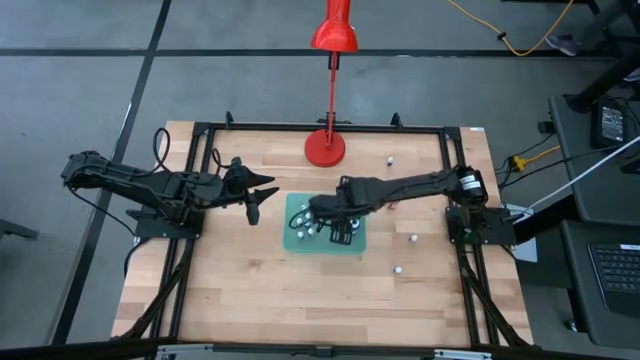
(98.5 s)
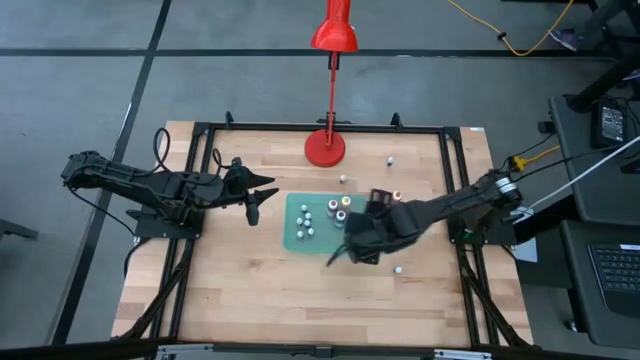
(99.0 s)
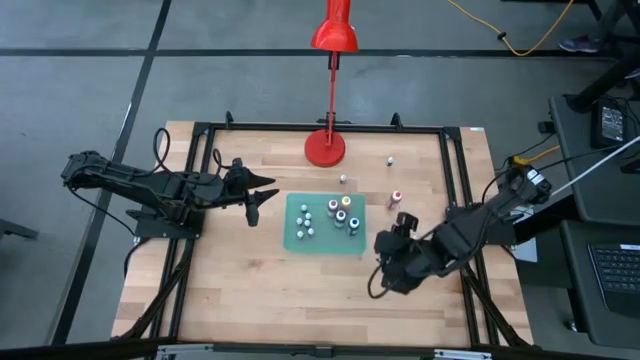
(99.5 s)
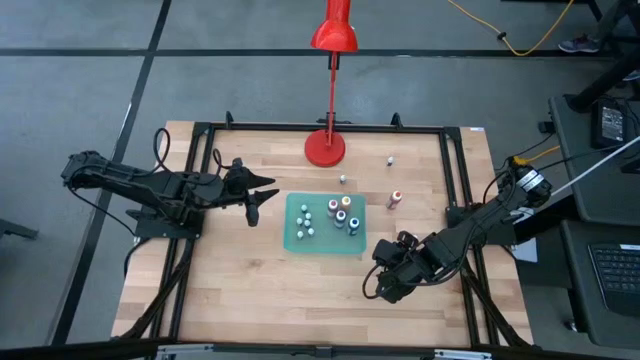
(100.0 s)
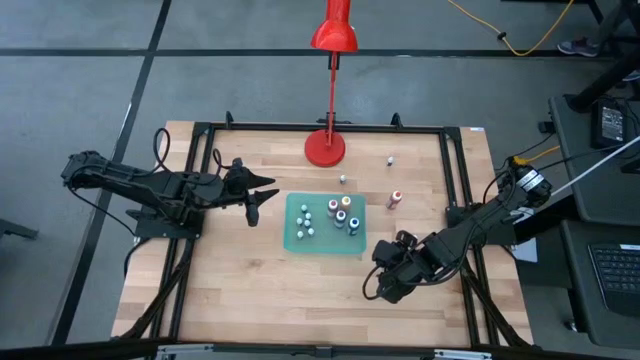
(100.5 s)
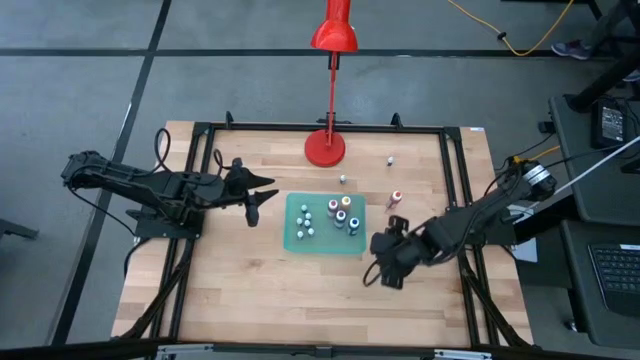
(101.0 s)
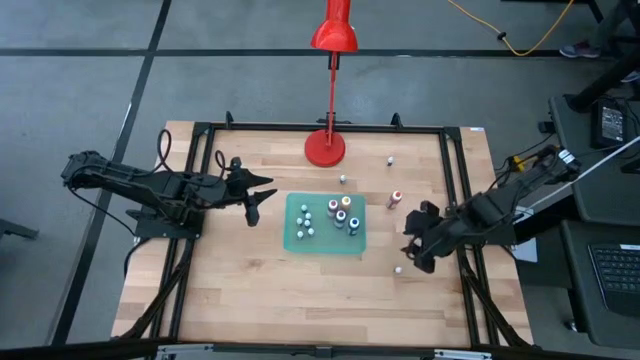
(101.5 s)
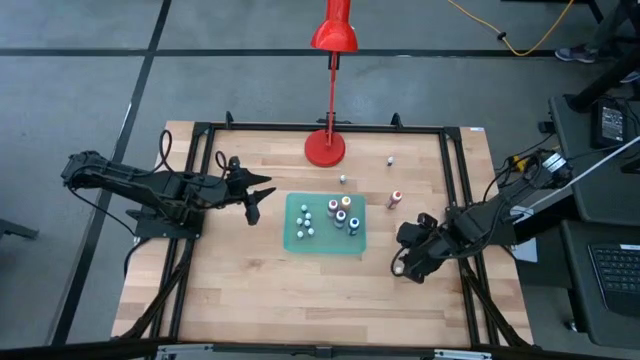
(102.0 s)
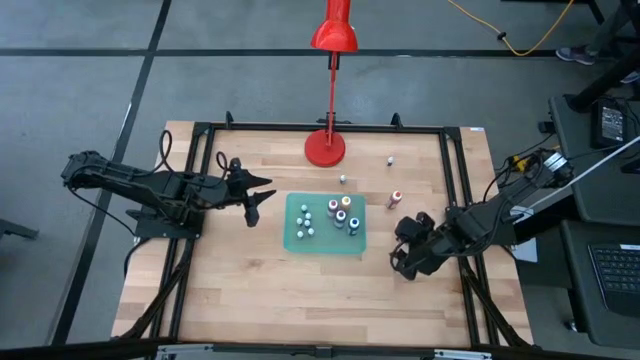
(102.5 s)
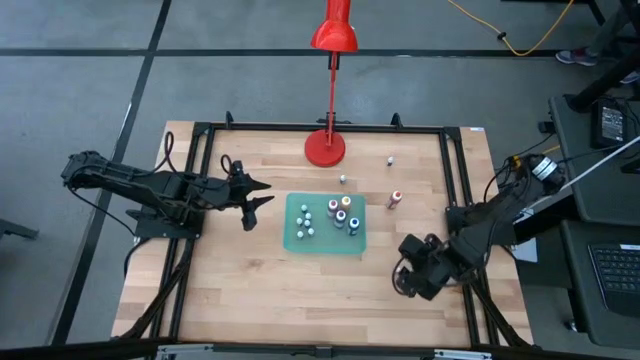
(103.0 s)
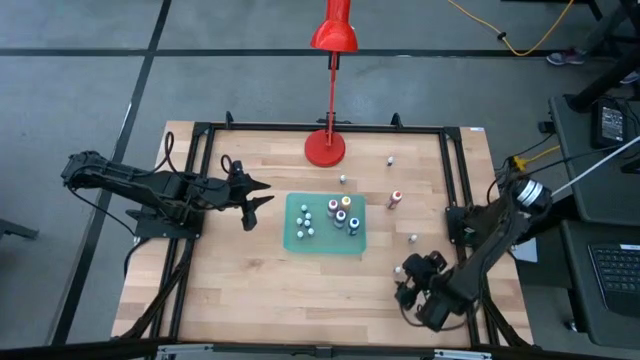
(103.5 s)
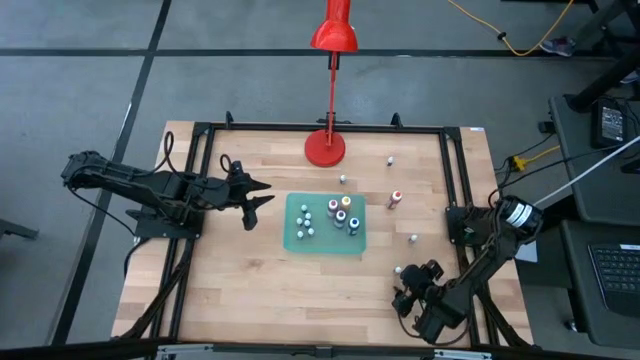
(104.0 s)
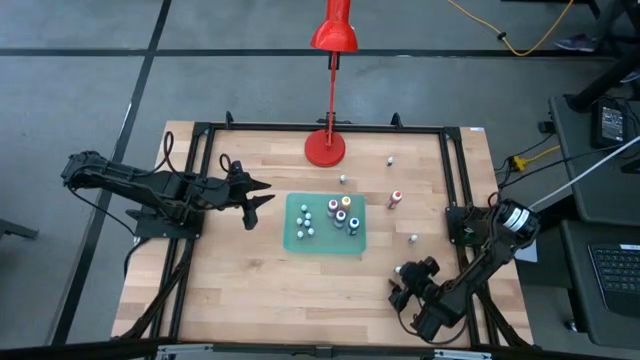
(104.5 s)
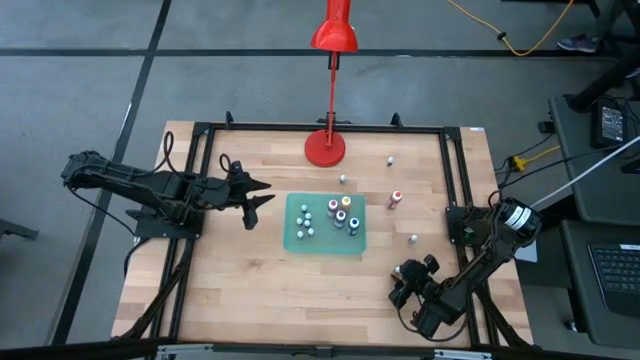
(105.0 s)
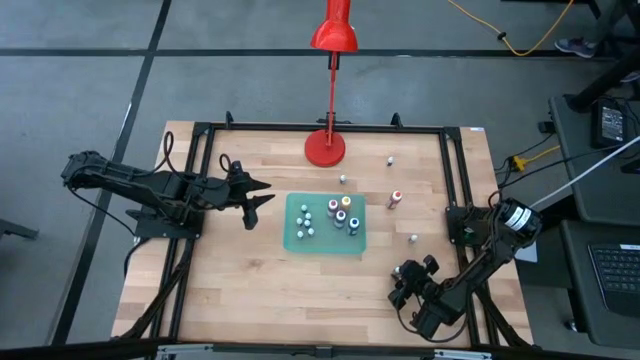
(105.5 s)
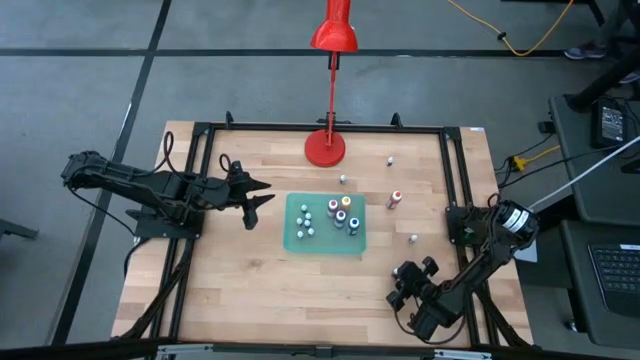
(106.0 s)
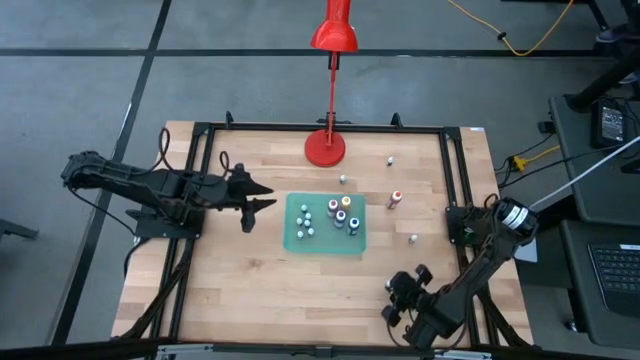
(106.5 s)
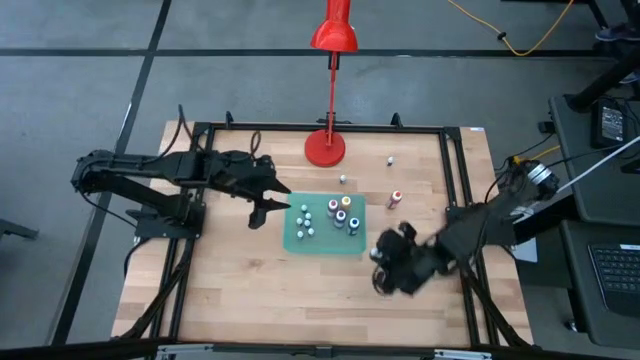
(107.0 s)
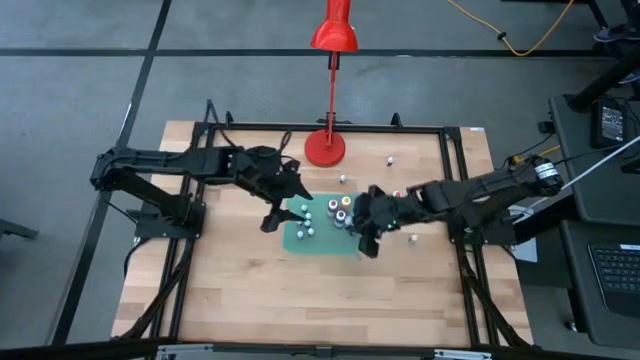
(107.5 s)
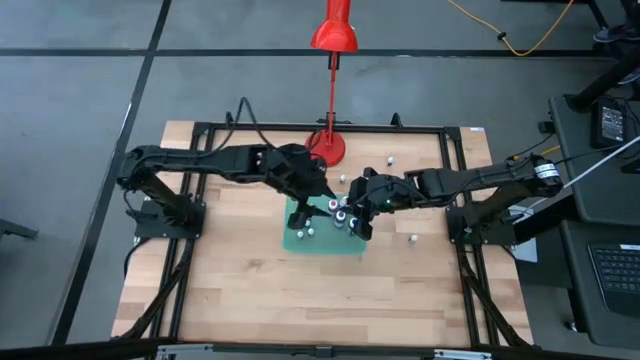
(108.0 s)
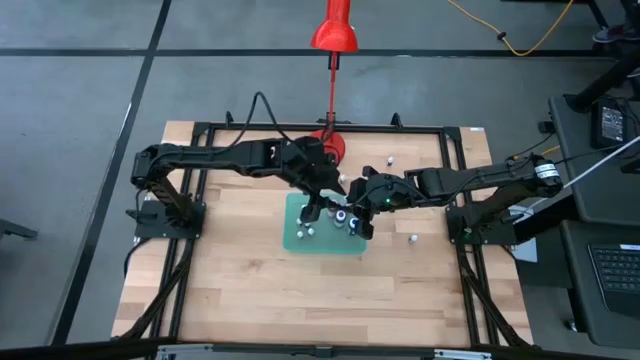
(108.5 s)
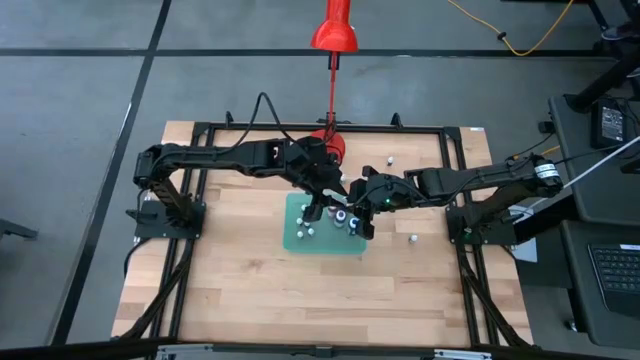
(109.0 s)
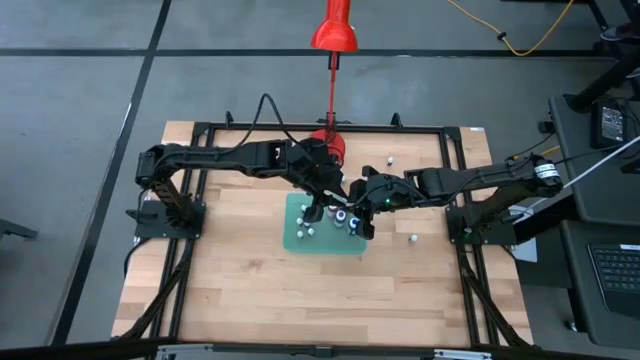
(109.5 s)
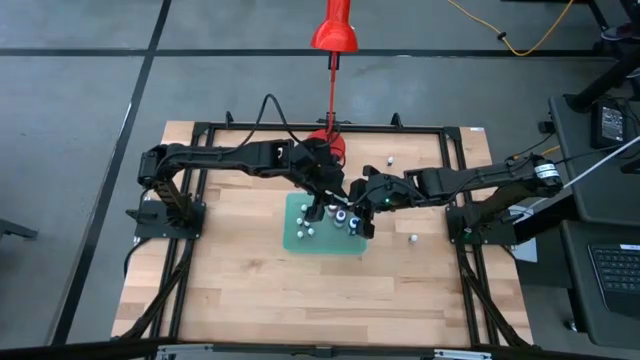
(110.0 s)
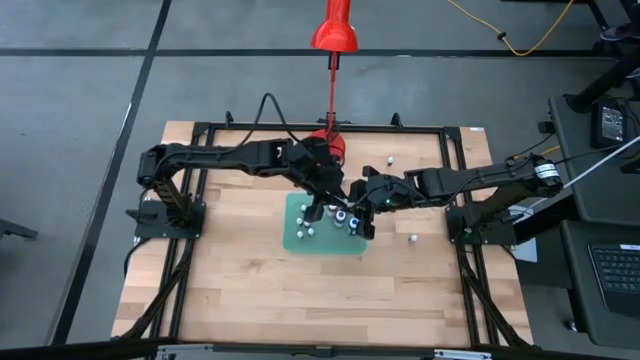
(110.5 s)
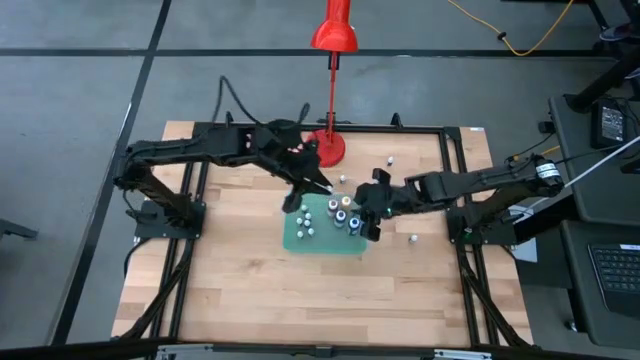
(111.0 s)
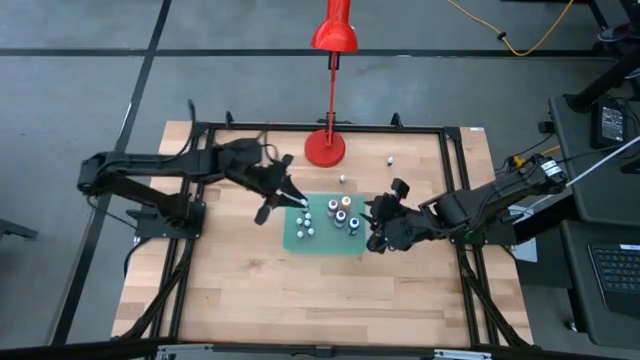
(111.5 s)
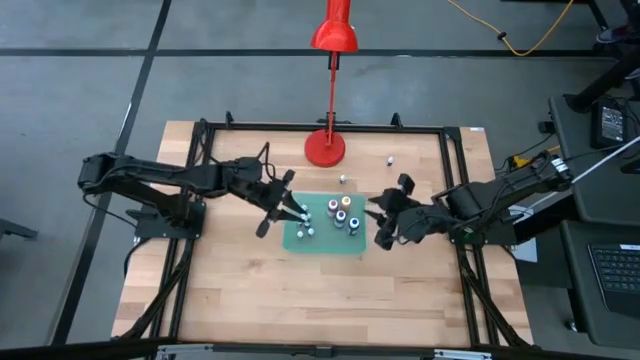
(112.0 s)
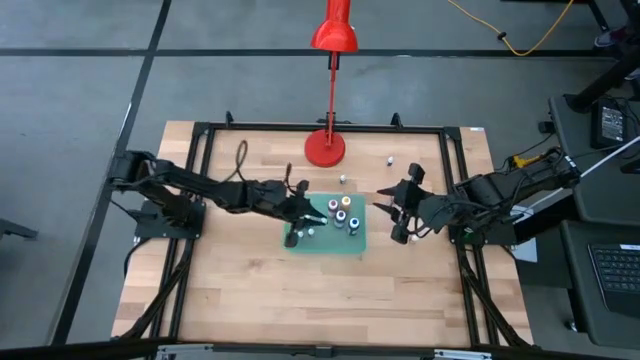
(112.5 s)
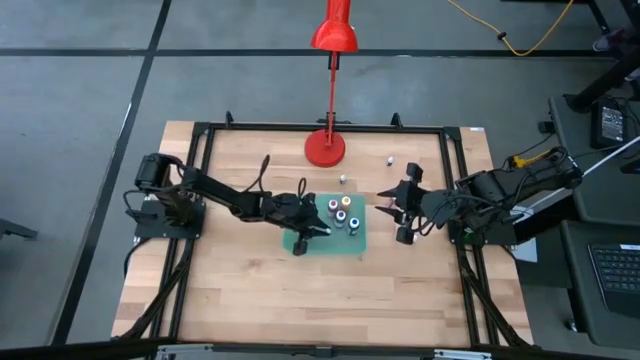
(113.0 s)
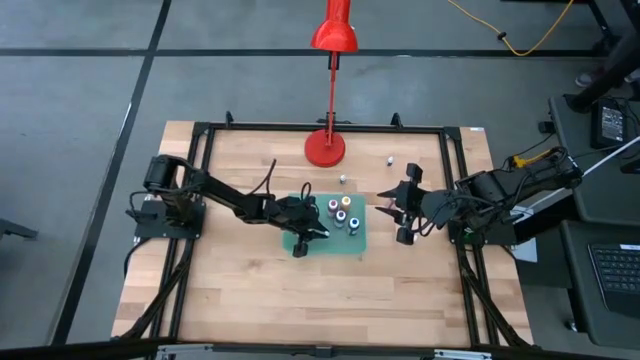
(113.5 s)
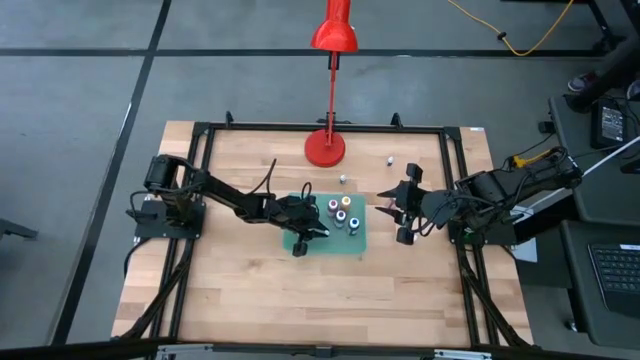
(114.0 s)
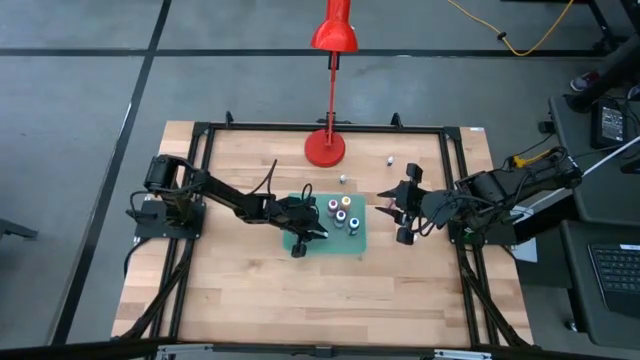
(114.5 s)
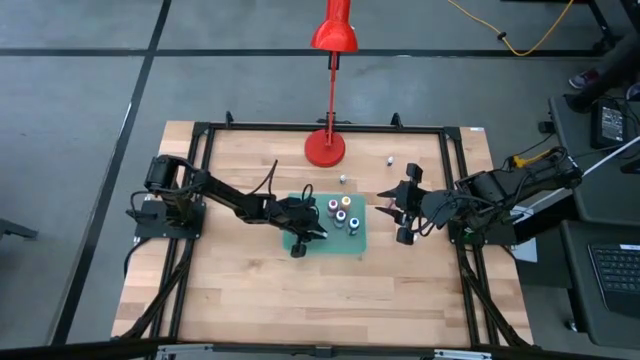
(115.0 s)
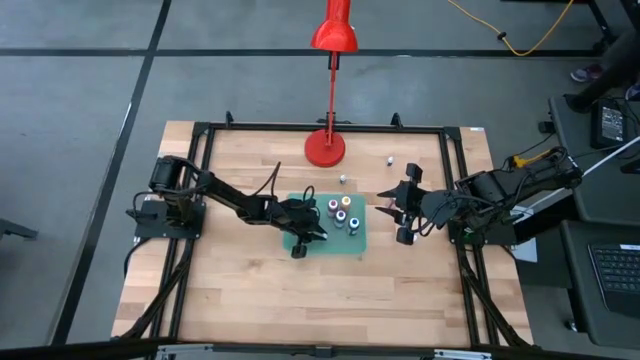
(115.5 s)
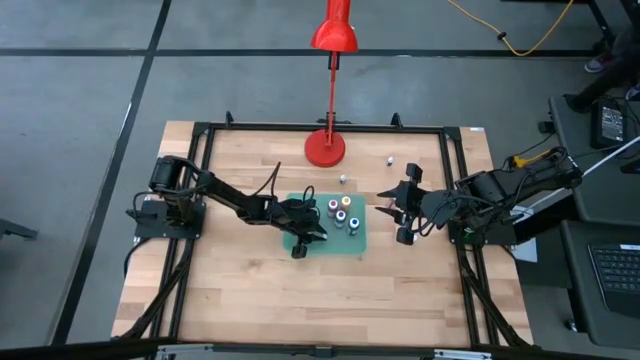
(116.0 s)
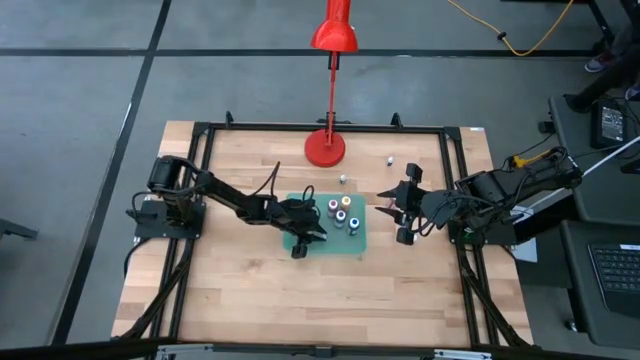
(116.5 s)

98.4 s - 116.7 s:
Task: Pick & Place food coloring
Put the small purple food coloring bottle into the green bin

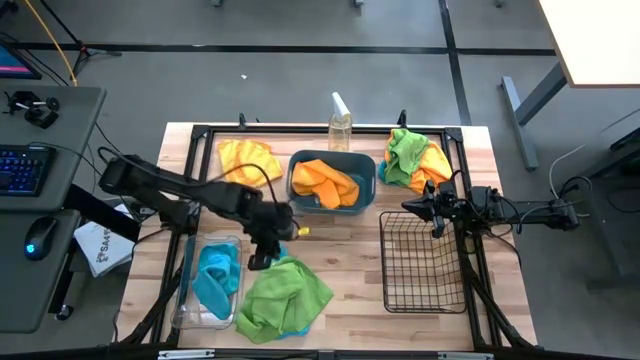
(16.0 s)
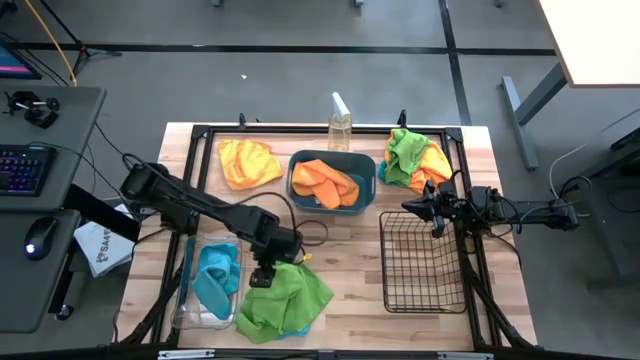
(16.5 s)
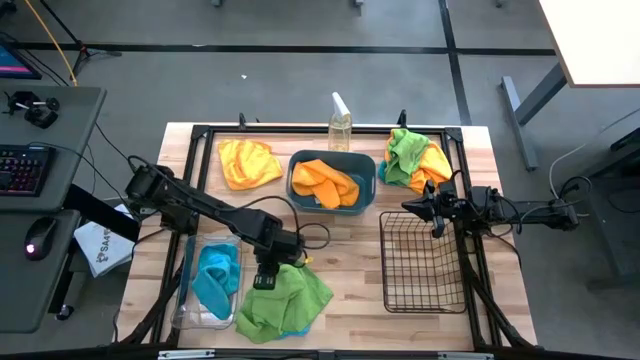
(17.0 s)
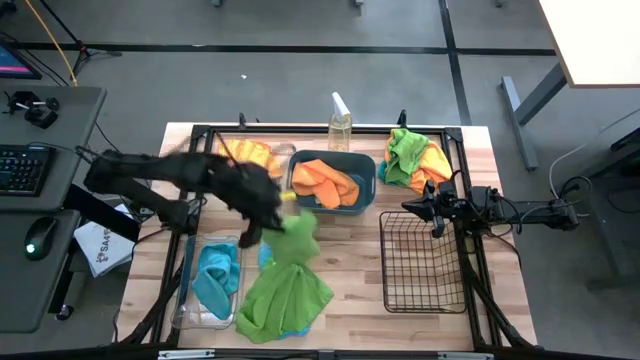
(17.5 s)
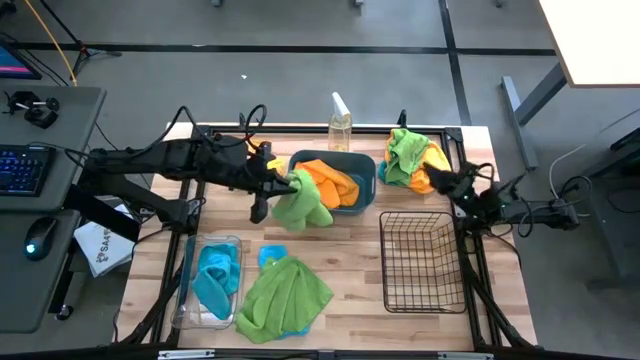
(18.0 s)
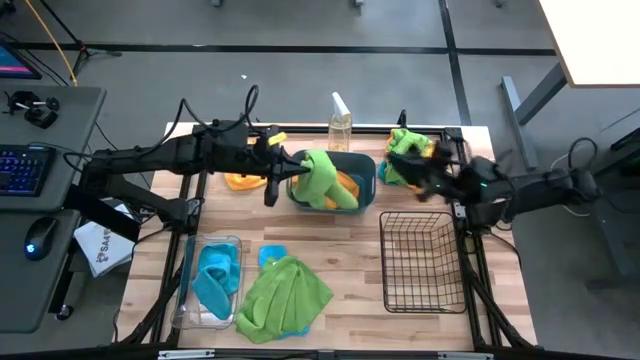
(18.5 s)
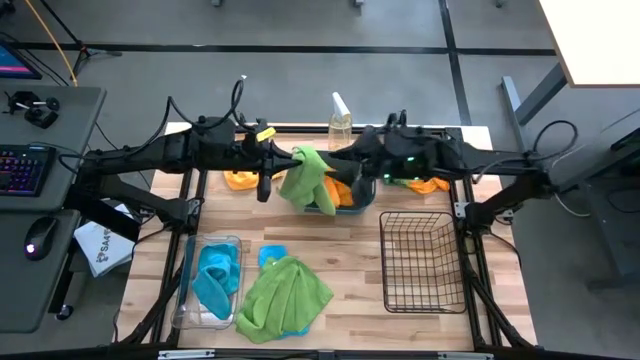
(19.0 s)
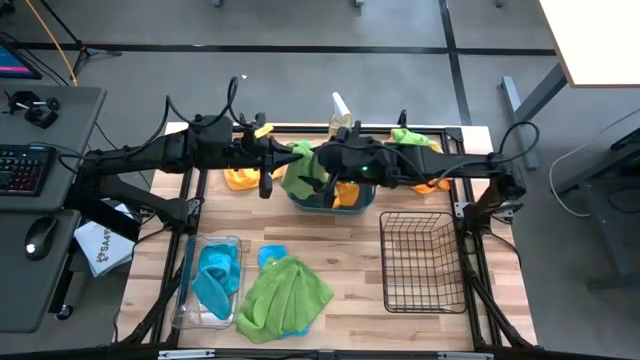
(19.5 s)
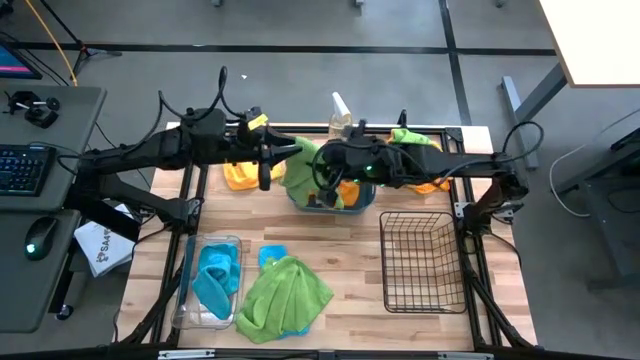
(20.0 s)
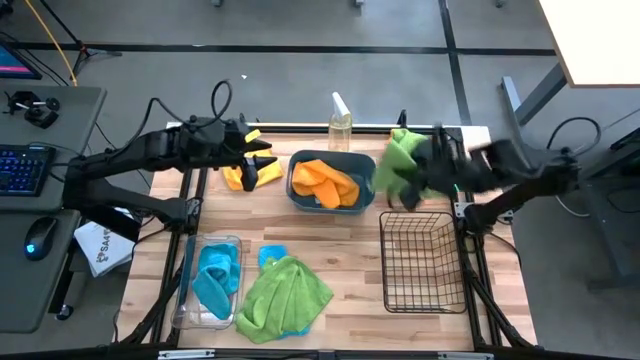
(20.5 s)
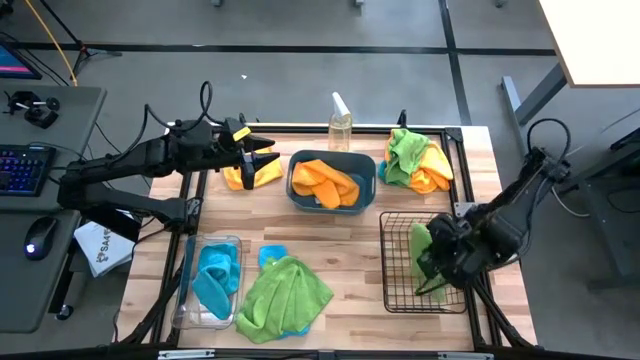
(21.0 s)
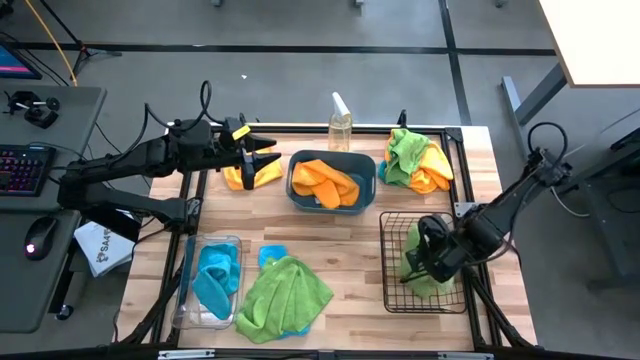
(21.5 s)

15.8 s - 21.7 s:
Task: Sort microfiber towel by color & place in baskets
Put the bottom green towel into the black wire basket
